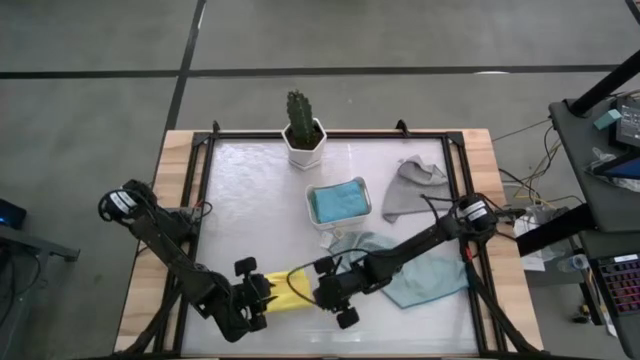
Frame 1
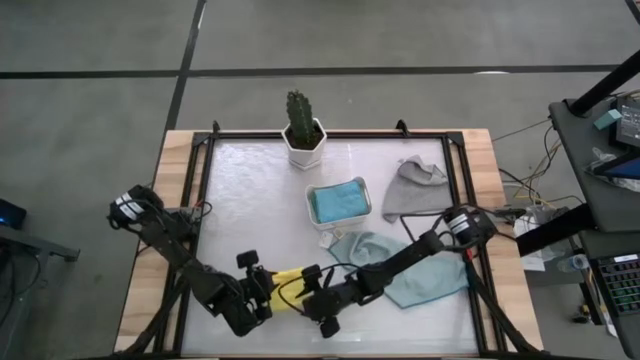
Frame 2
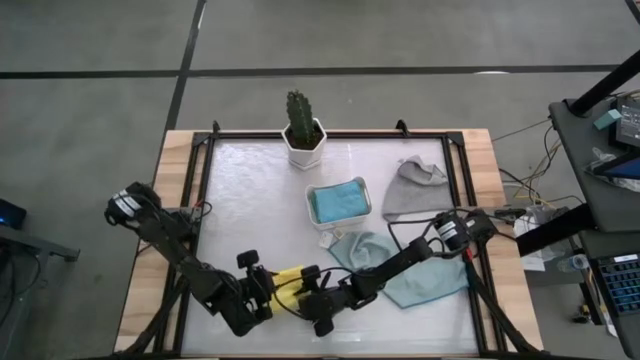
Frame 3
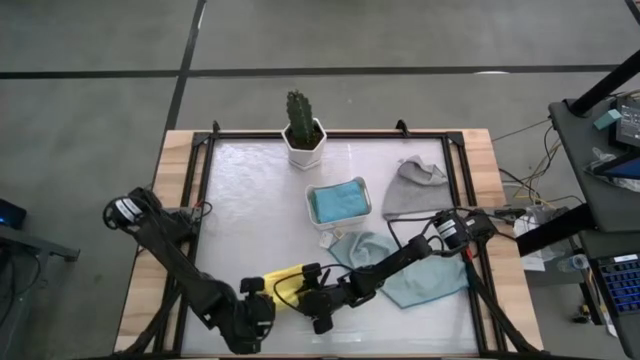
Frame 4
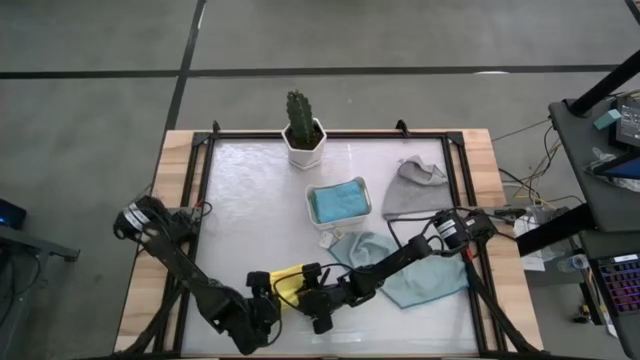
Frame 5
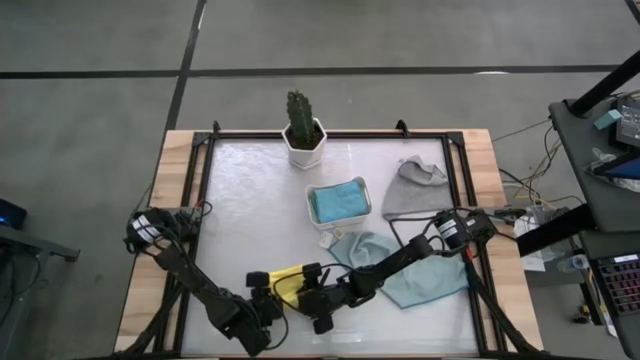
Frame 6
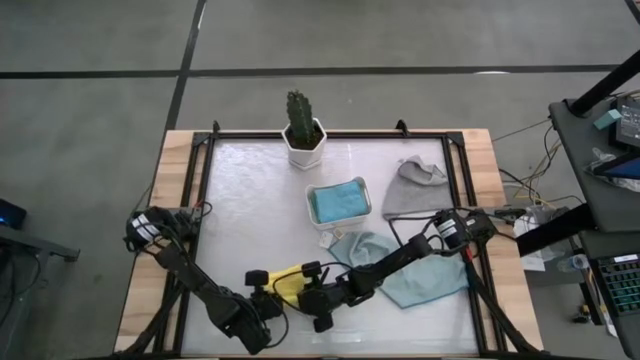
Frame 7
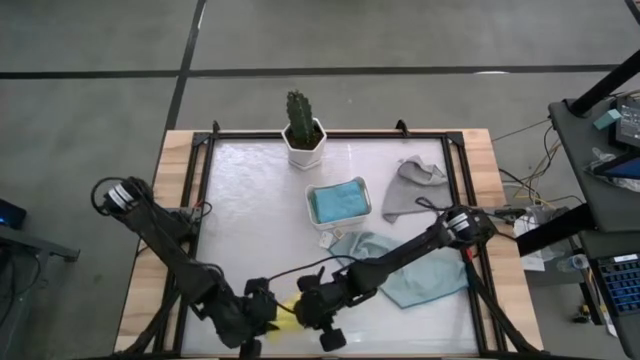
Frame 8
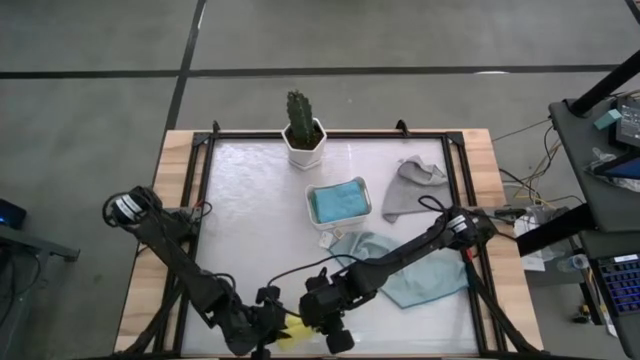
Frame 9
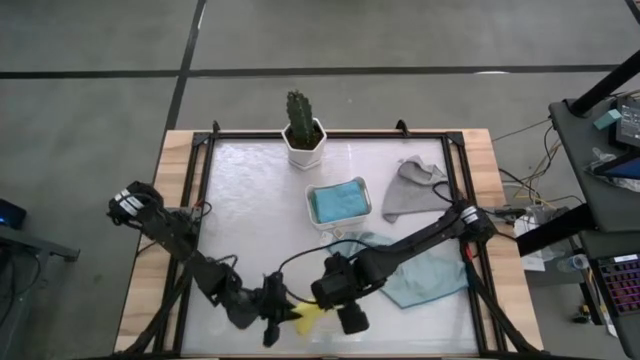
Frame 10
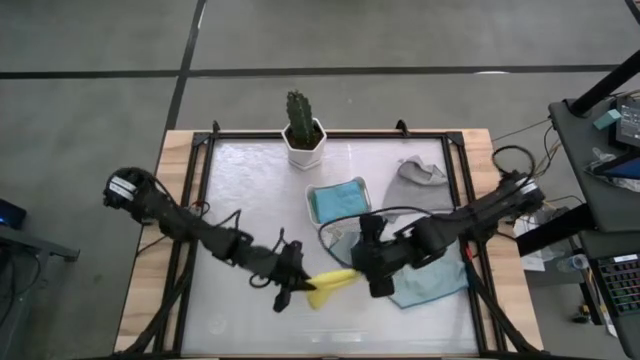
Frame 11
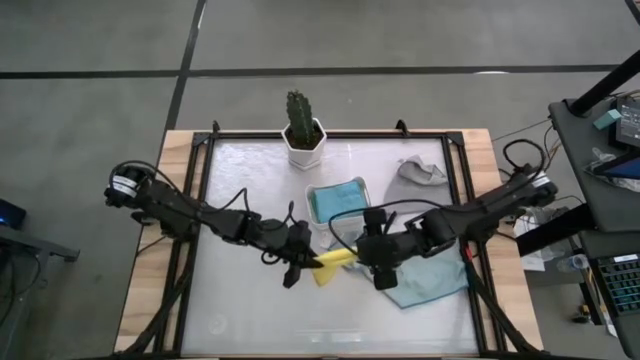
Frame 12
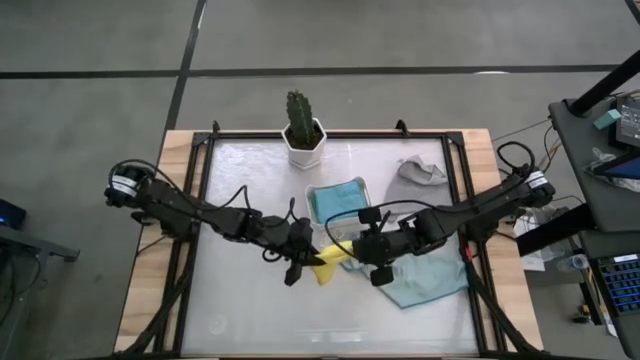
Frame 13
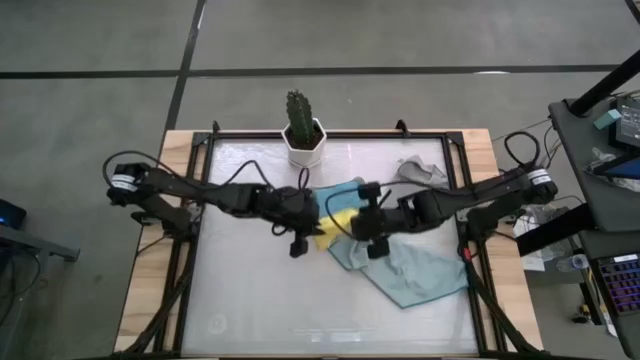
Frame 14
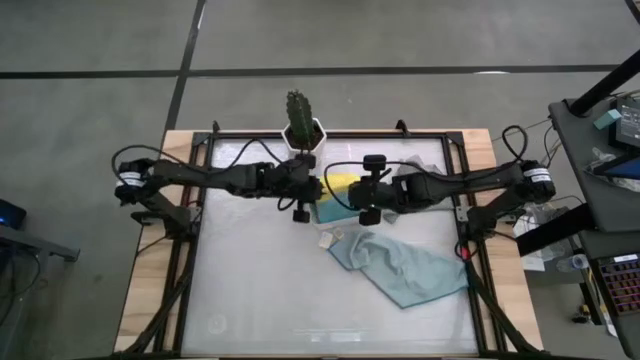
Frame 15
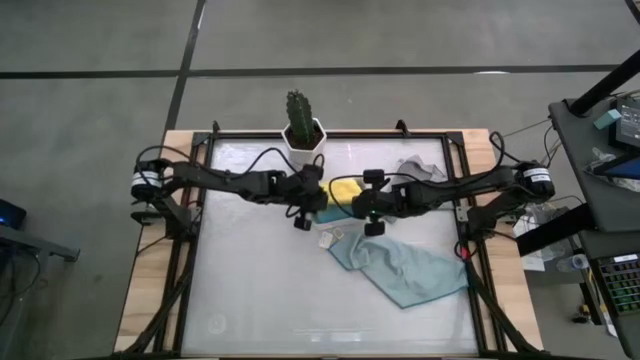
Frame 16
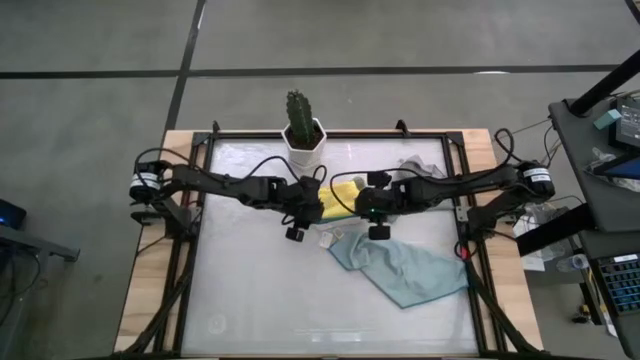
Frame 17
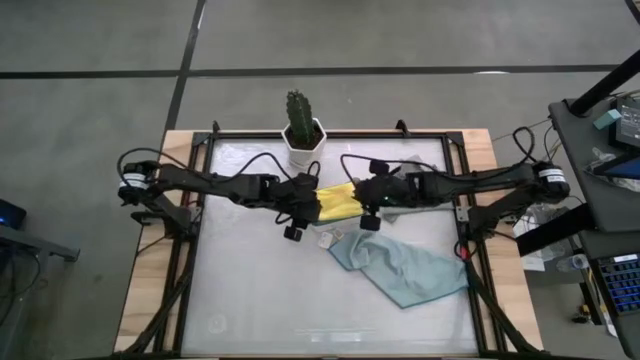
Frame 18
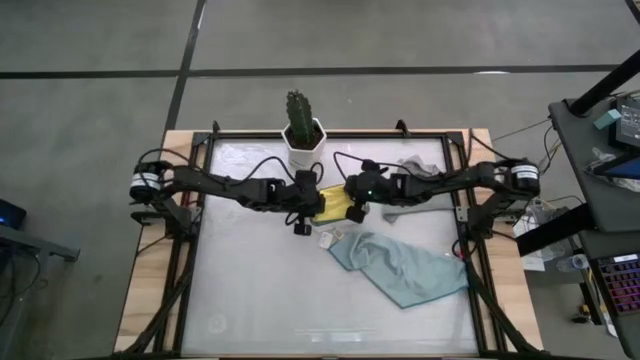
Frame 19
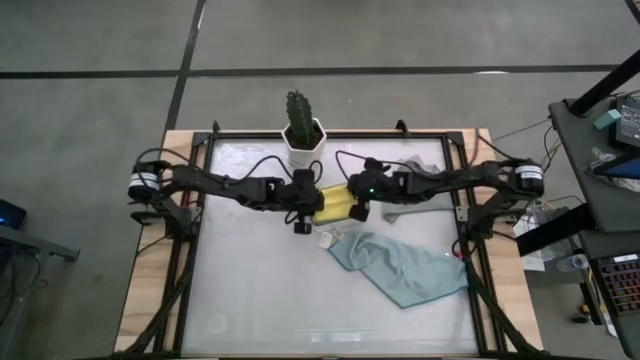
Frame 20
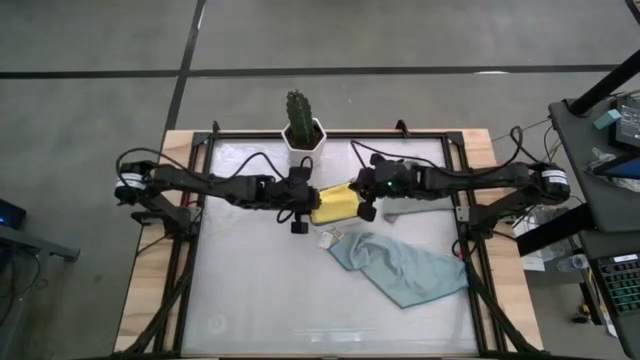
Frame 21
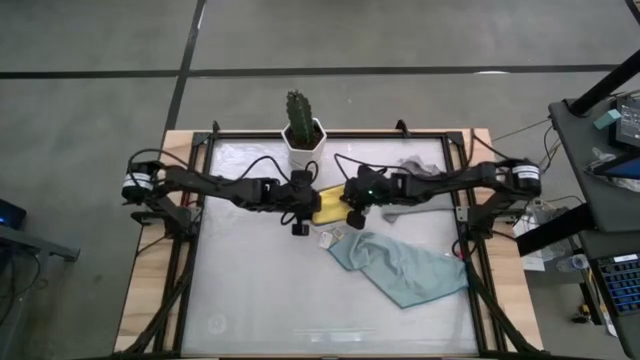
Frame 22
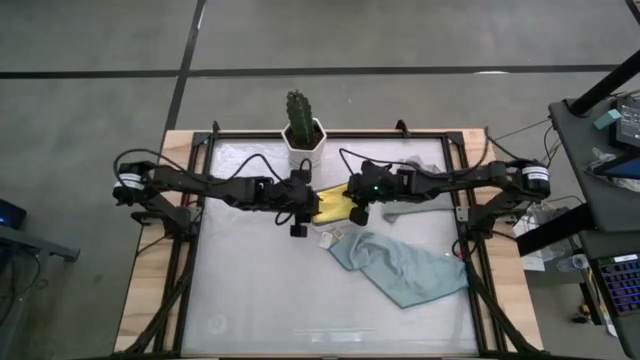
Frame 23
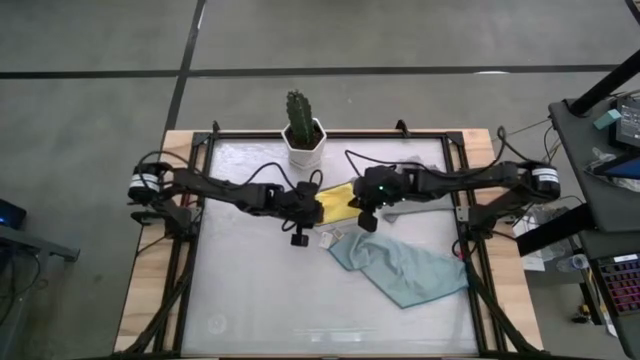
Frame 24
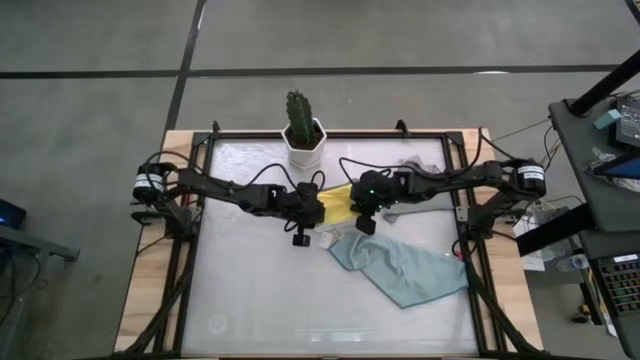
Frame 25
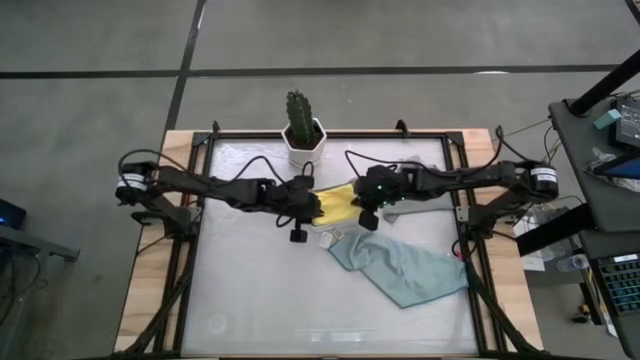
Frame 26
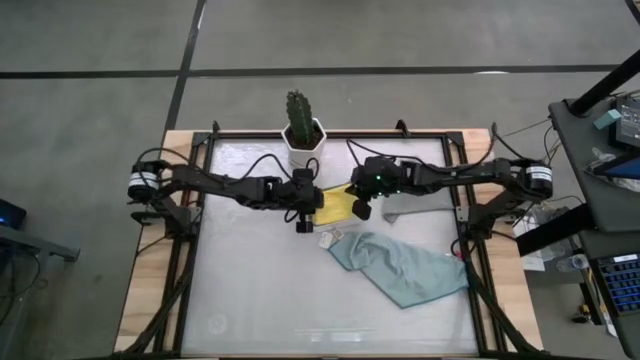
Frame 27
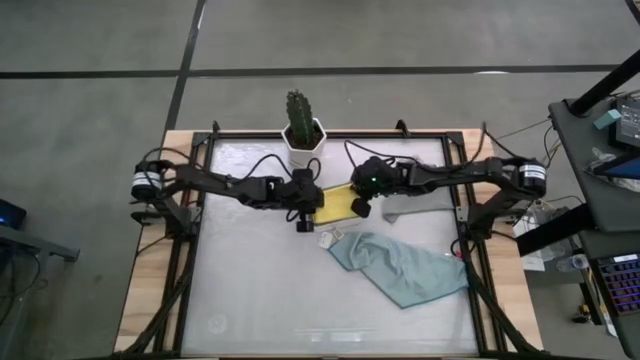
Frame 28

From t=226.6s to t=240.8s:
Task: Fold microfiber towels
Put the yellow towel into the bin

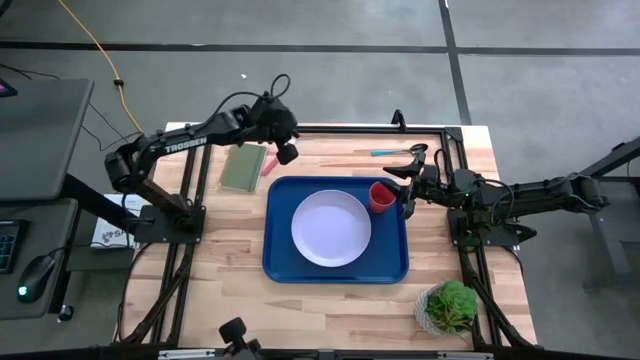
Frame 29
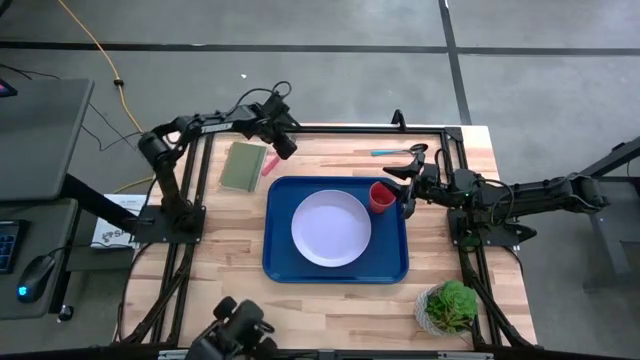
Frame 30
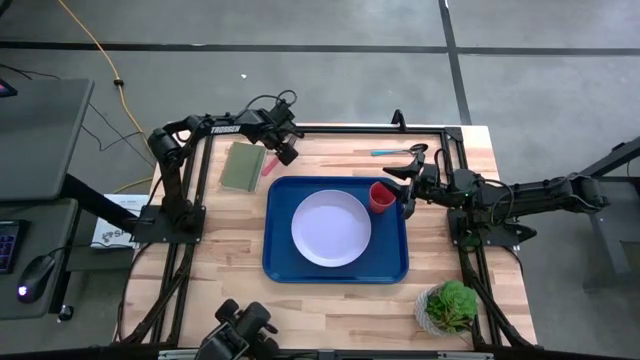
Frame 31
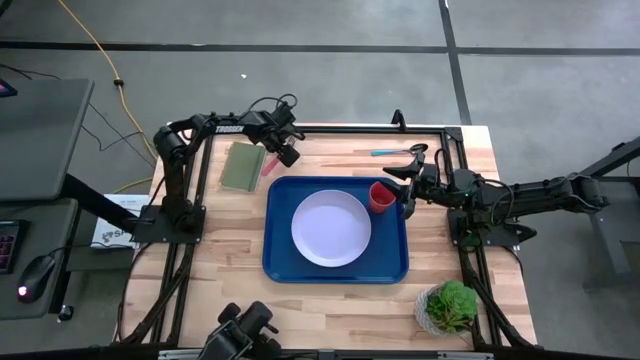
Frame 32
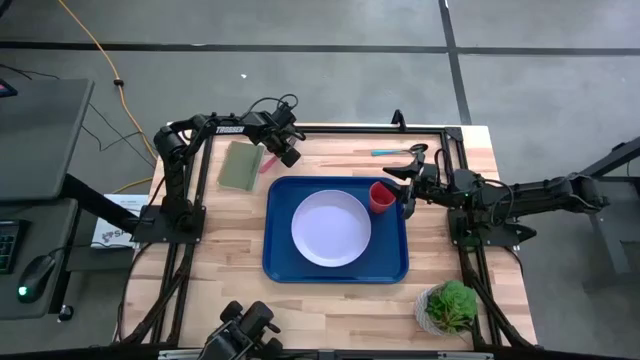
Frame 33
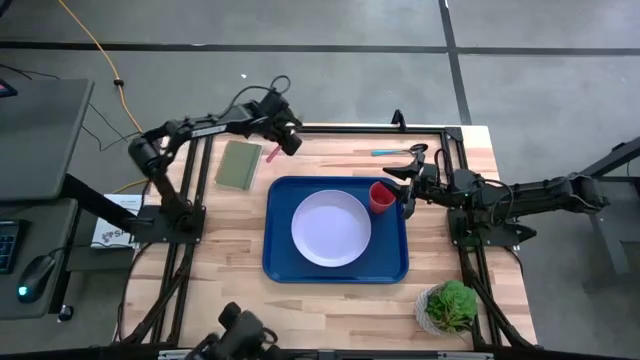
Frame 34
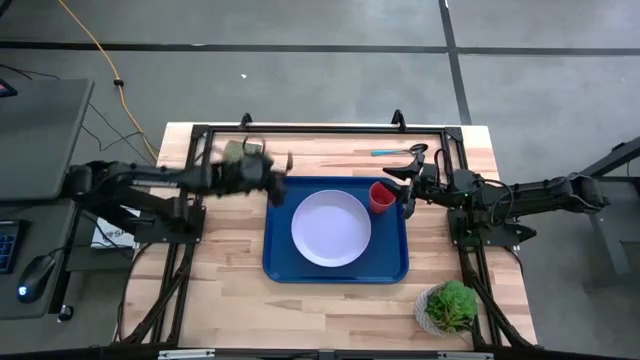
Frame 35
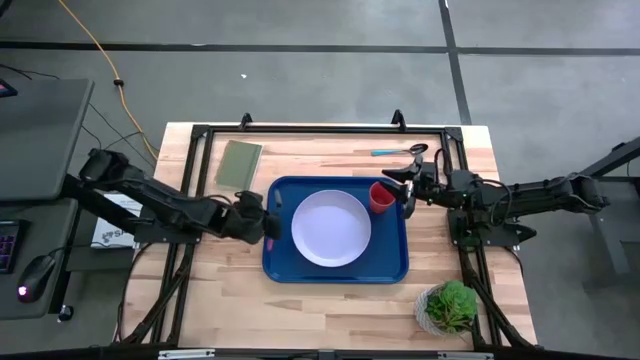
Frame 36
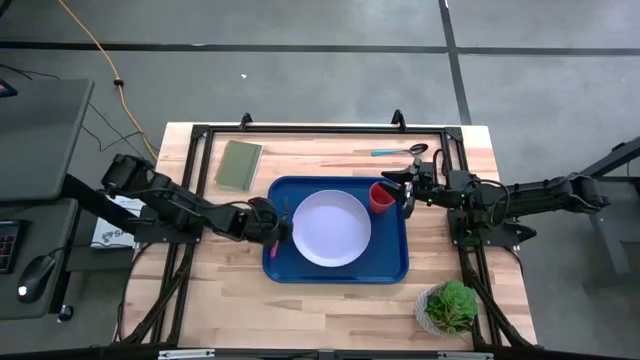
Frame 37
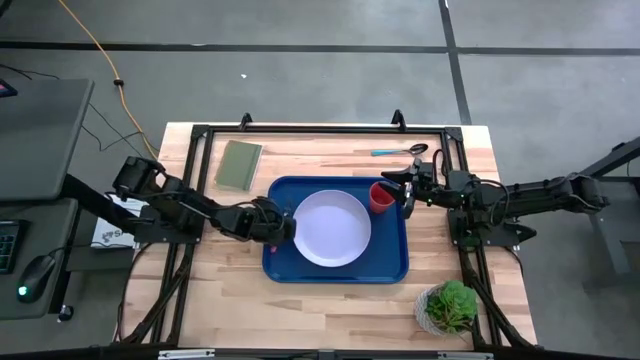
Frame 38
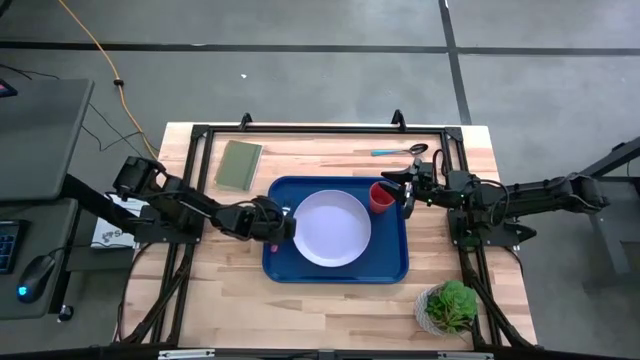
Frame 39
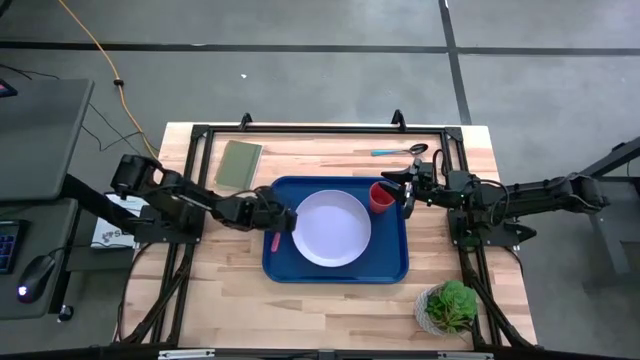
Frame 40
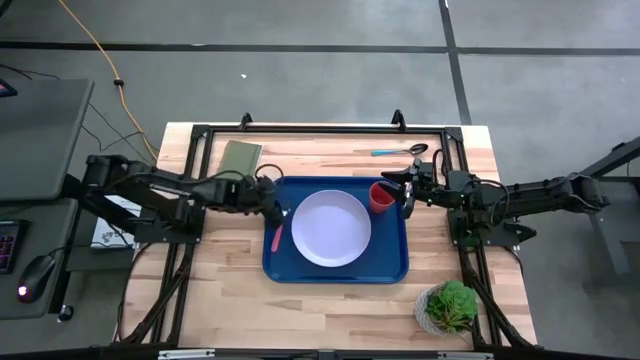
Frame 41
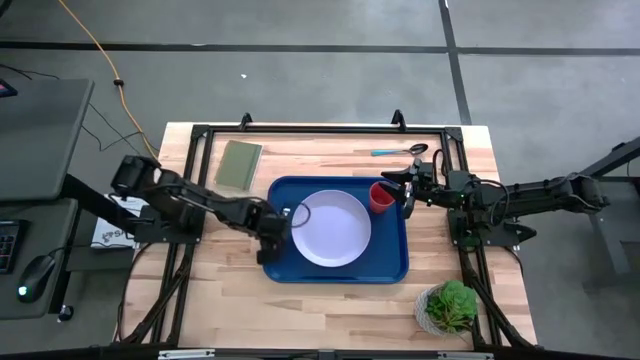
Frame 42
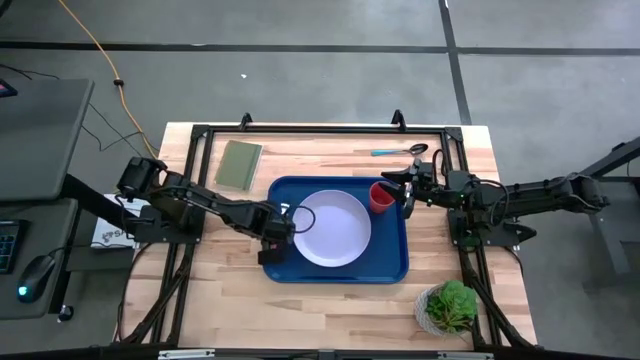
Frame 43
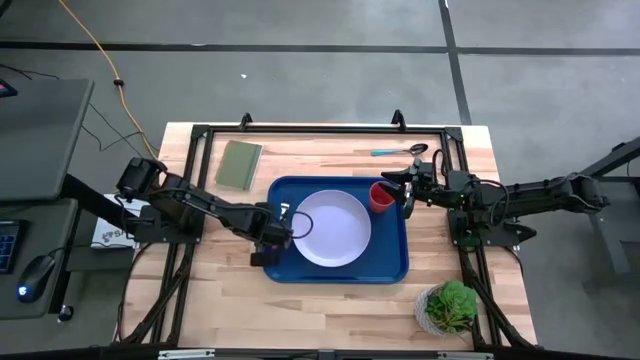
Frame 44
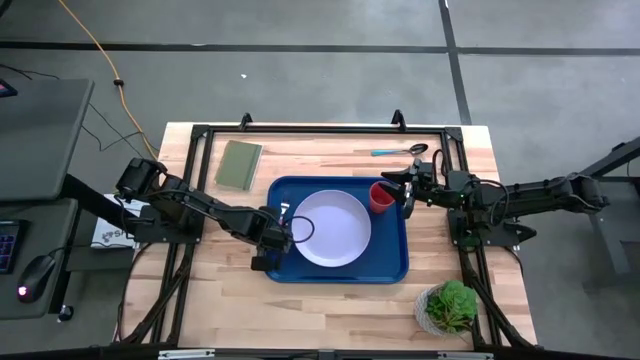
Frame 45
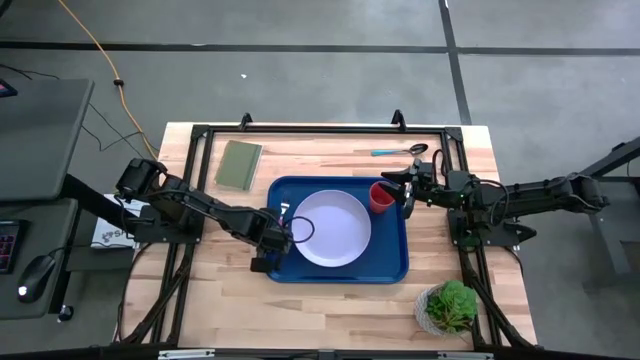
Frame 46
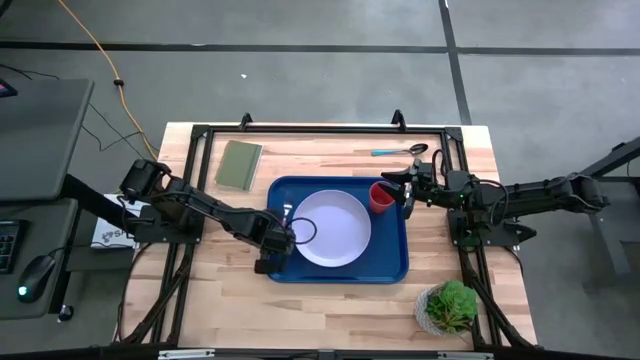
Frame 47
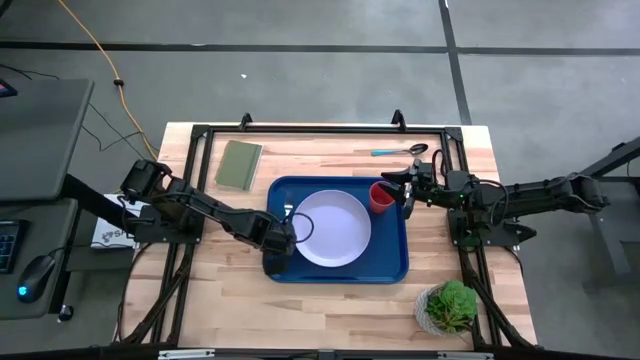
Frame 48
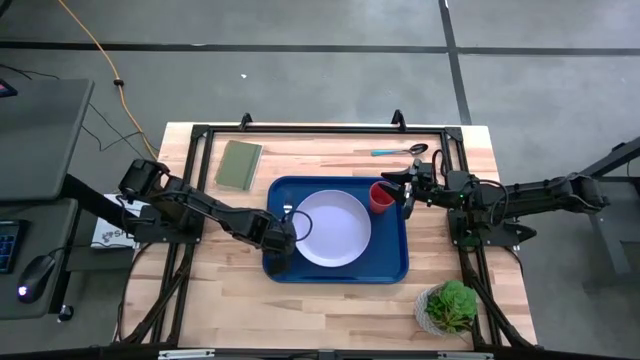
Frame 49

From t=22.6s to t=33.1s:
Task: Pick and place plate/cup/fork/spoon on tray
Put the red fork on the blue serving tray to the left of the purple plate
